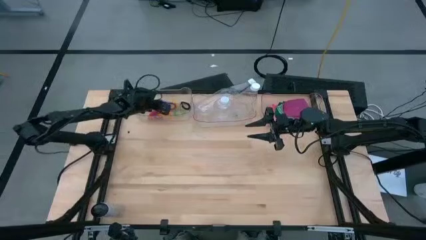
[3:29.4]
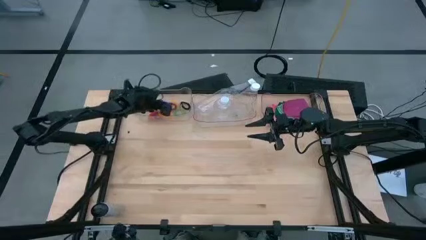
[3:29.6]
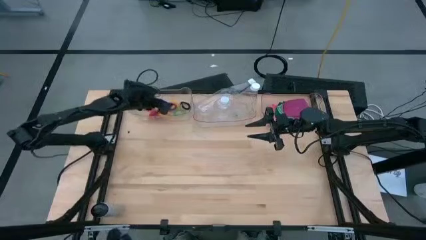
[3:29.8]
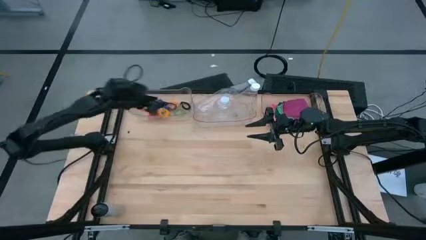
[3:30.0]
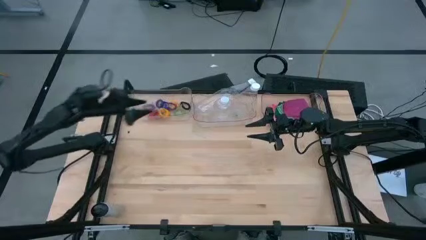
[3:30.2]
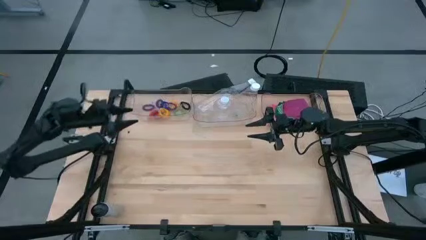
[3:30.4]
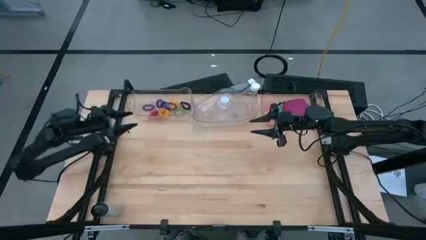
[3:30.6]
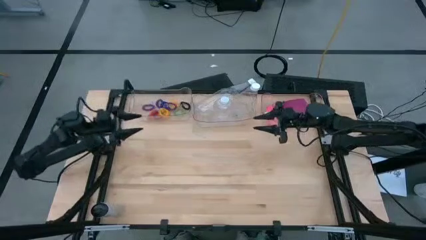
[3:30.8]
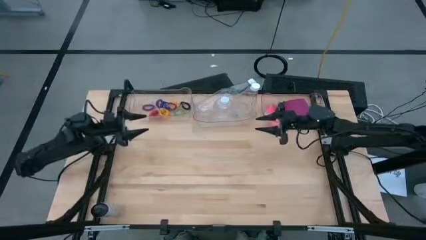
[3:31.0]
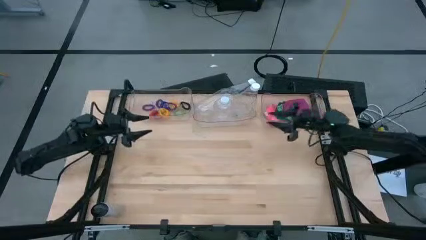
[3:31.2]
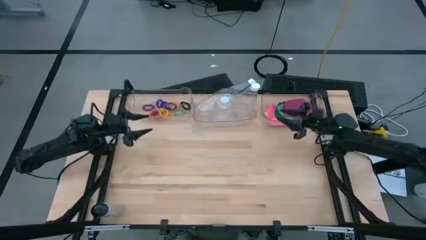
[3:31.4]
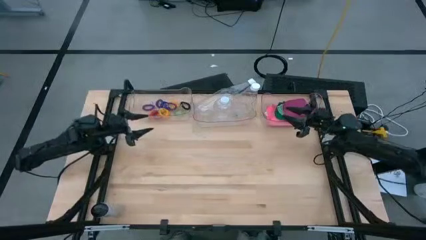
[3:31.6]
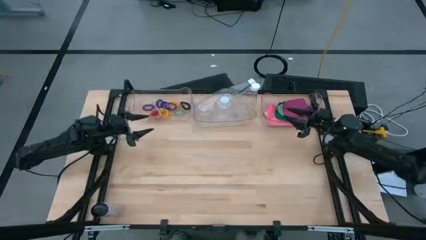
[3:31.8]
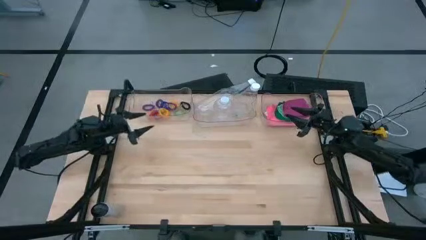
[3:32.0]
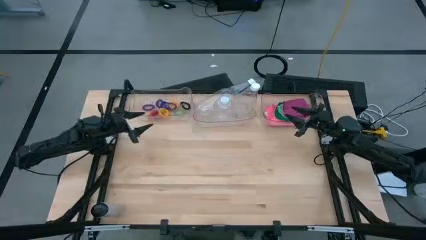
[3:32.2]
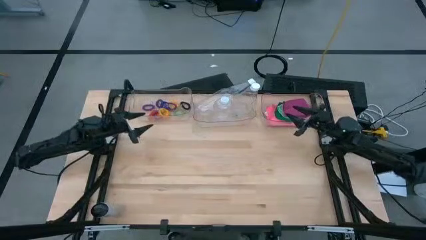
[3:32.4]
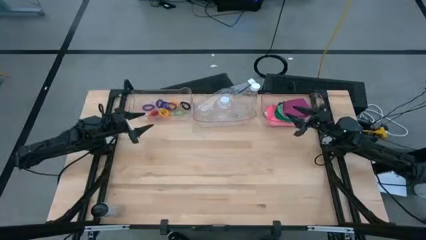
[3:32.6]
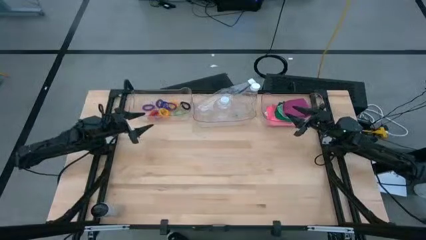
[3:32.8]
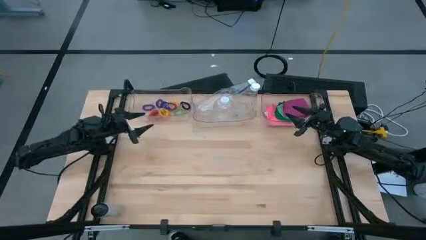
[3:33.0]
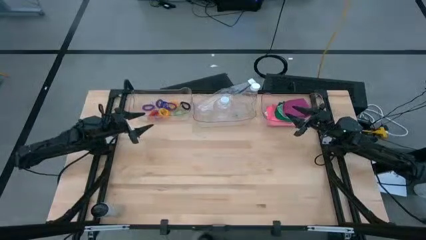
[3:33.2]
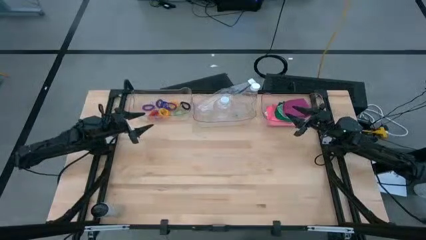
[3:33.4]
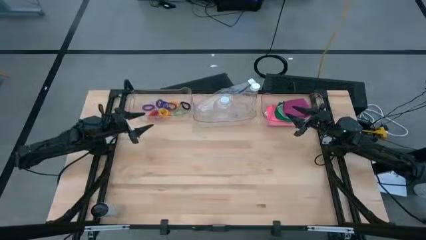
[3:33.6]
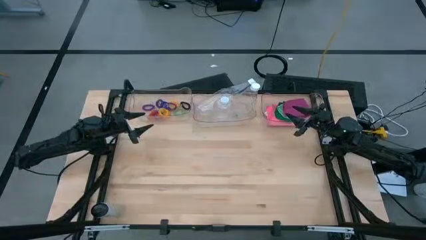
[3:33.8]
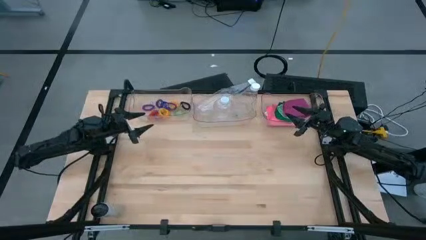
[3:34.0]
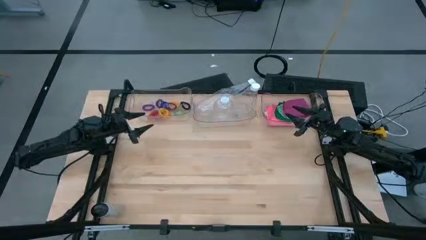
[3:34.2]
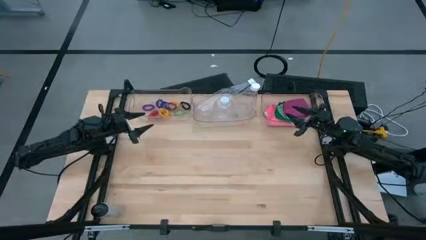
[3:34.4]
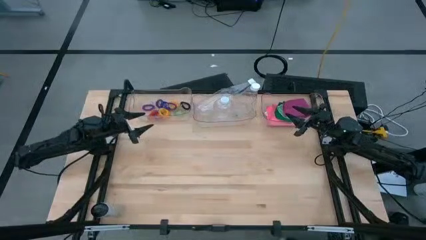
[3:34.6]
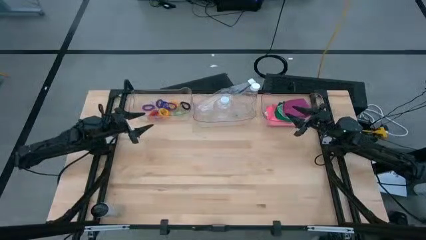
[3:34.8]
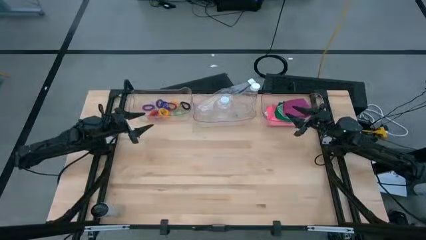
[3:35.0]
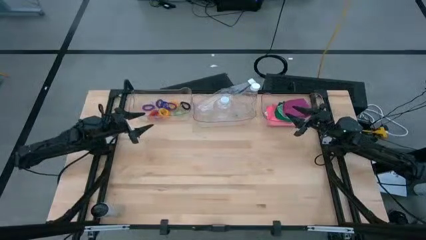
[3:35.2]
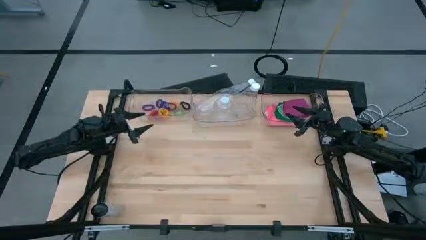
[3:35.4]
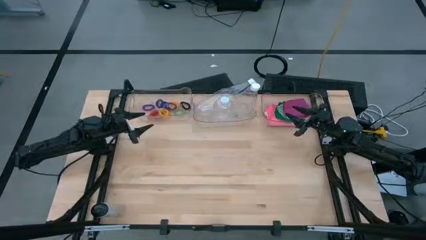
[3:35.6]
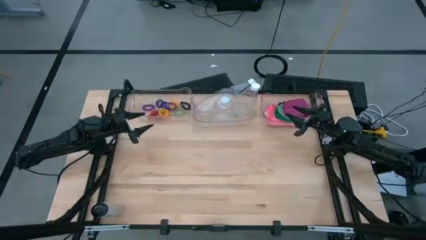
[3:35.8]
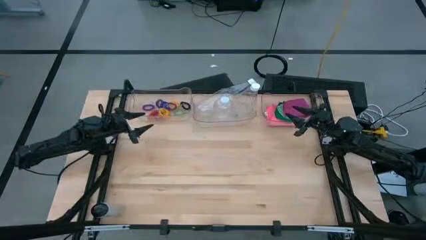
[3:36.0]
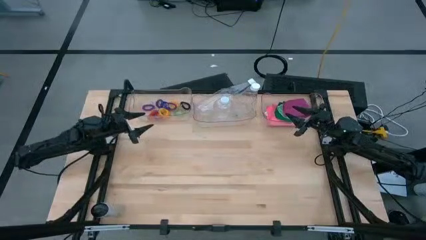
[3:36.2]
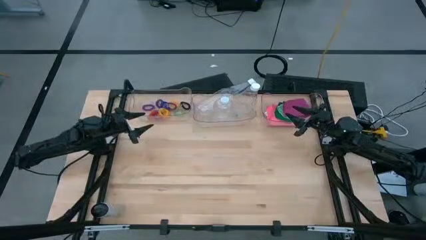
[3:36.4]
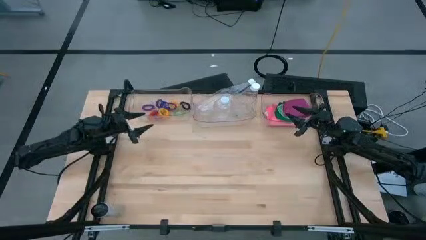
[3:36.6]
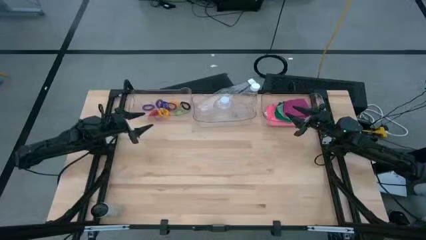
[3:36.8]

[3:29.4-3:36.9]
Task: Pick & Place Sports Items
Return to Home Position

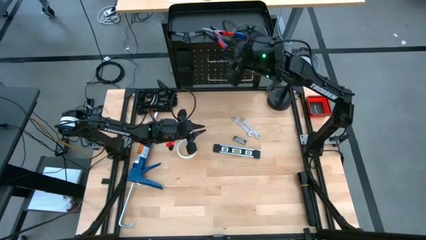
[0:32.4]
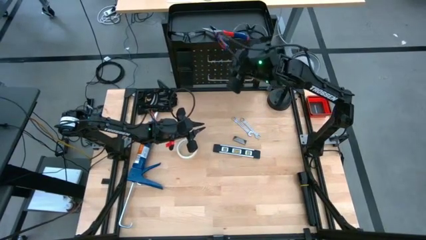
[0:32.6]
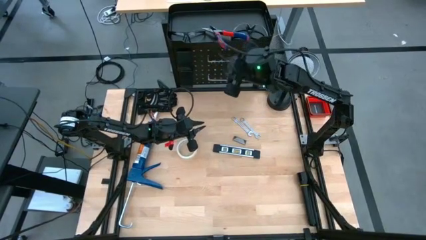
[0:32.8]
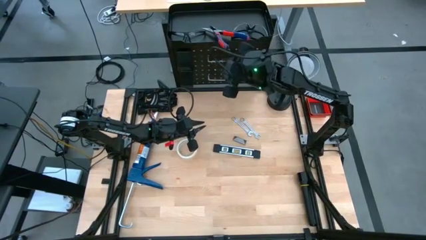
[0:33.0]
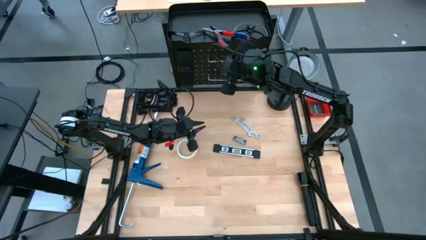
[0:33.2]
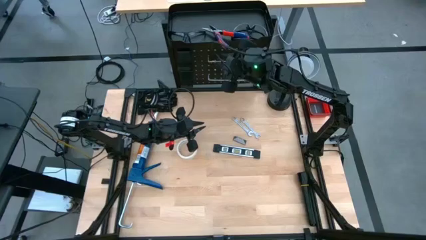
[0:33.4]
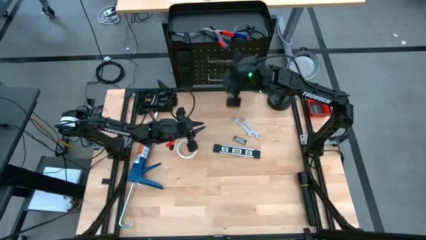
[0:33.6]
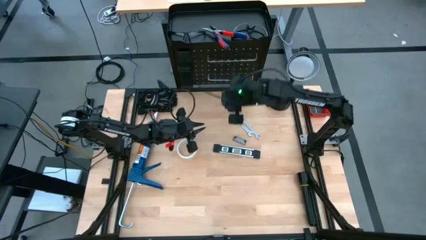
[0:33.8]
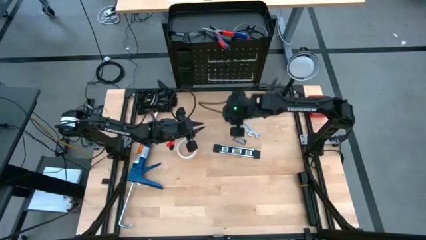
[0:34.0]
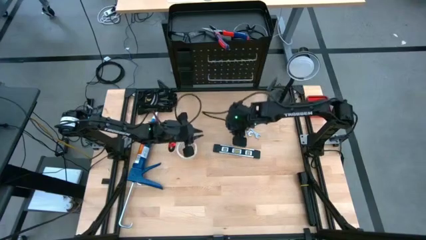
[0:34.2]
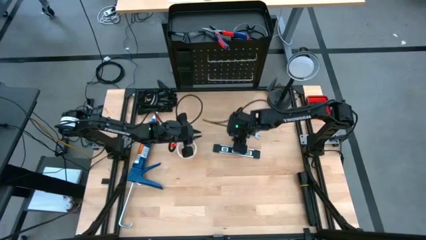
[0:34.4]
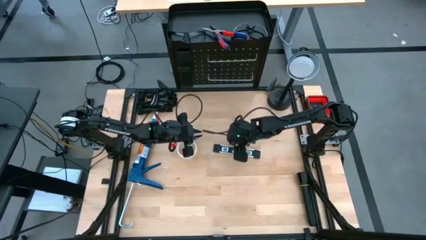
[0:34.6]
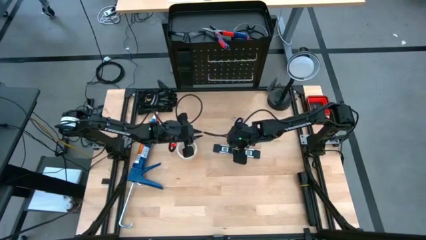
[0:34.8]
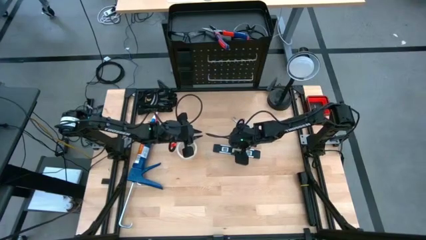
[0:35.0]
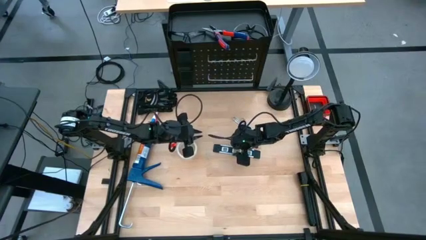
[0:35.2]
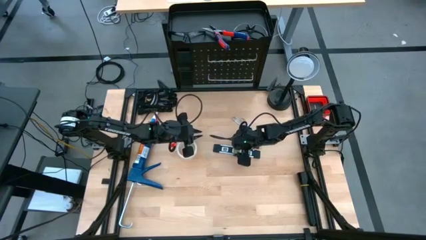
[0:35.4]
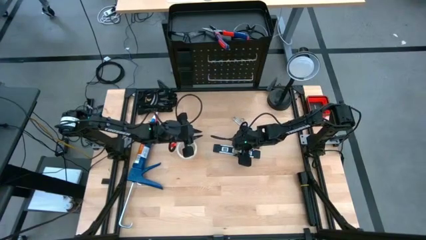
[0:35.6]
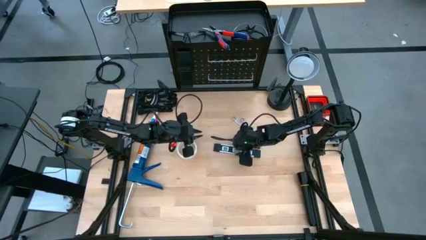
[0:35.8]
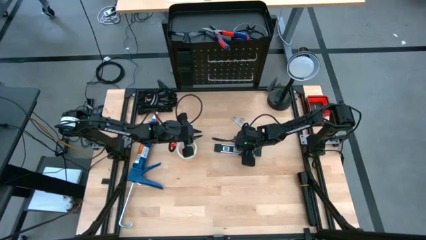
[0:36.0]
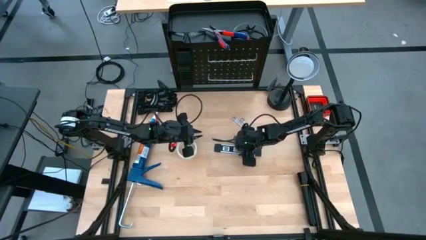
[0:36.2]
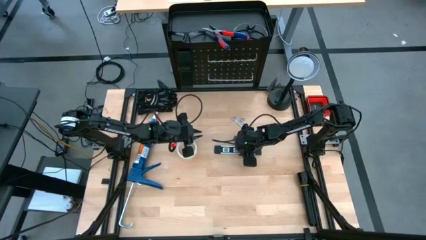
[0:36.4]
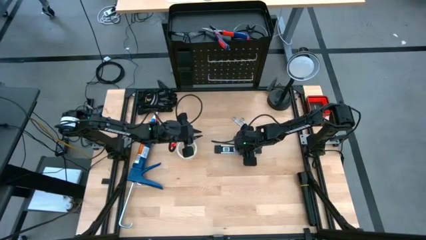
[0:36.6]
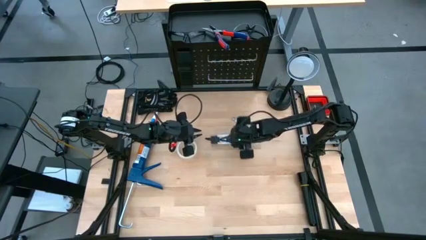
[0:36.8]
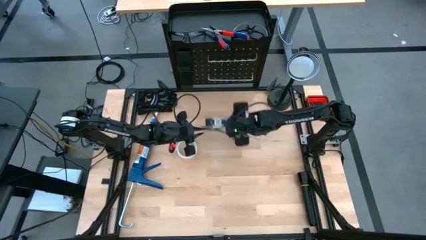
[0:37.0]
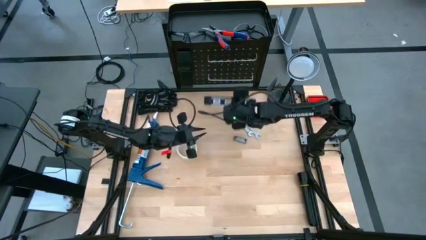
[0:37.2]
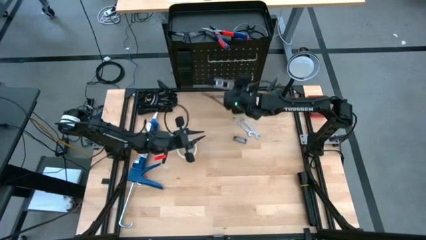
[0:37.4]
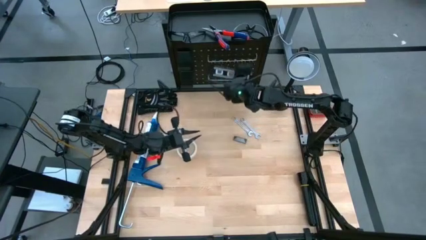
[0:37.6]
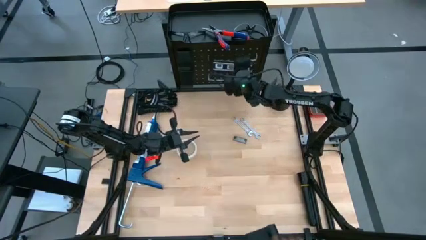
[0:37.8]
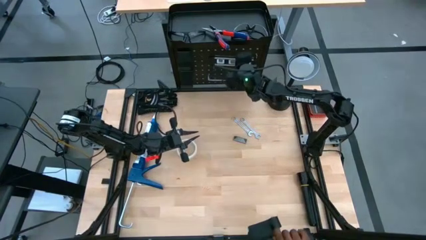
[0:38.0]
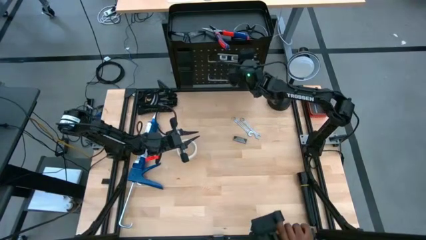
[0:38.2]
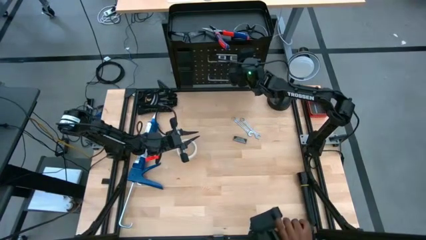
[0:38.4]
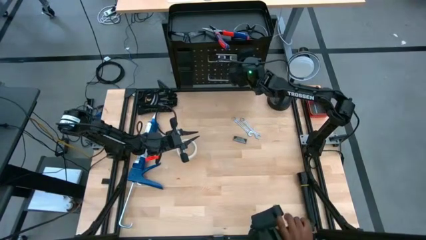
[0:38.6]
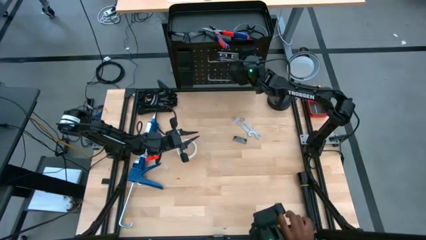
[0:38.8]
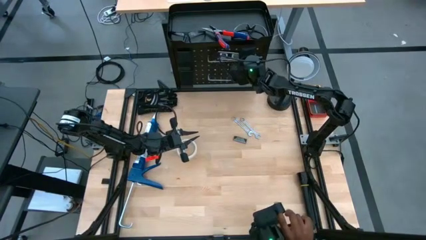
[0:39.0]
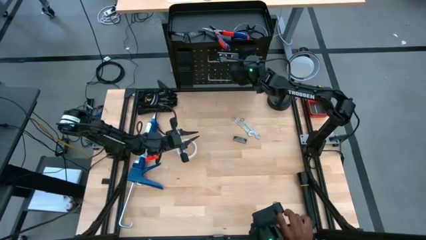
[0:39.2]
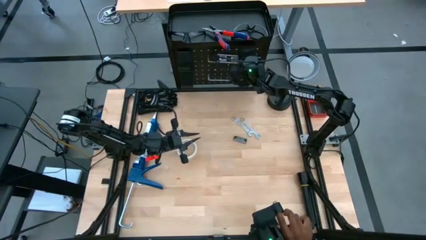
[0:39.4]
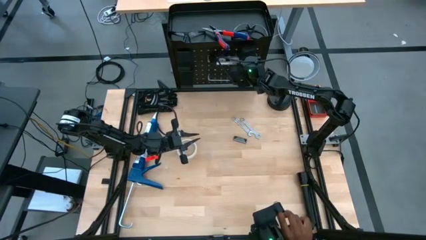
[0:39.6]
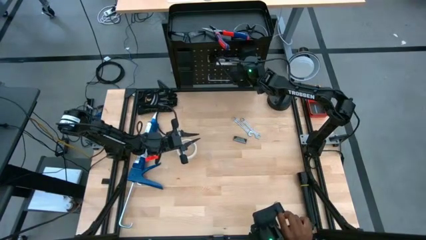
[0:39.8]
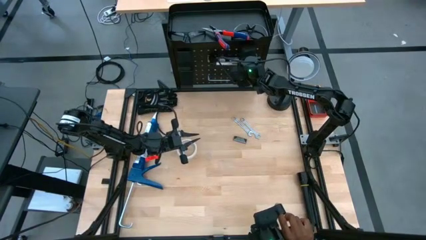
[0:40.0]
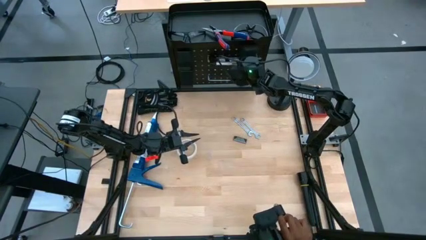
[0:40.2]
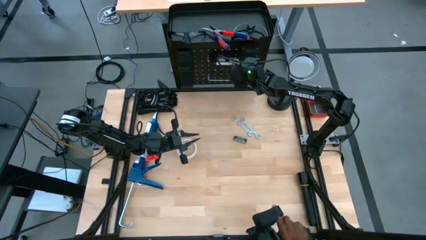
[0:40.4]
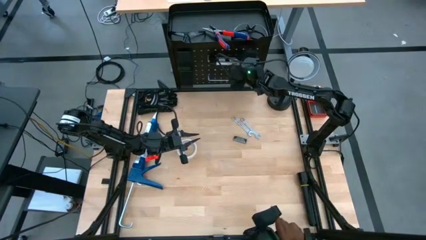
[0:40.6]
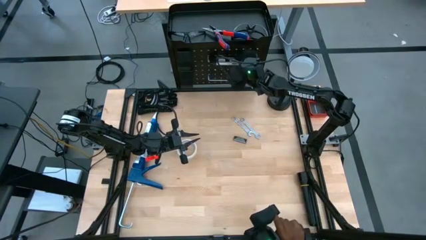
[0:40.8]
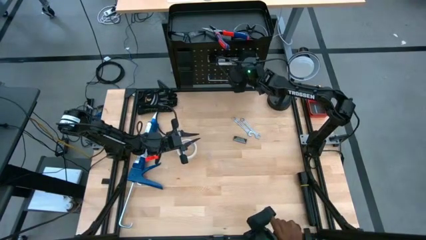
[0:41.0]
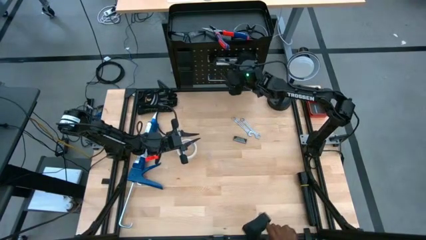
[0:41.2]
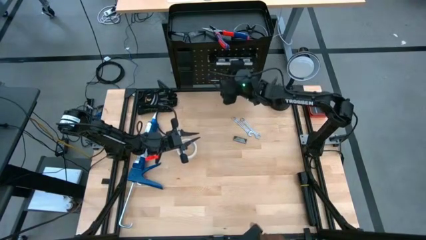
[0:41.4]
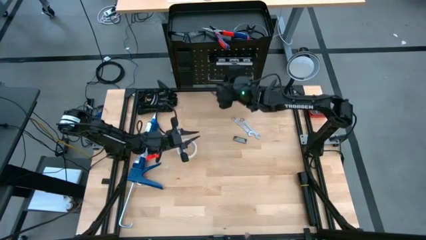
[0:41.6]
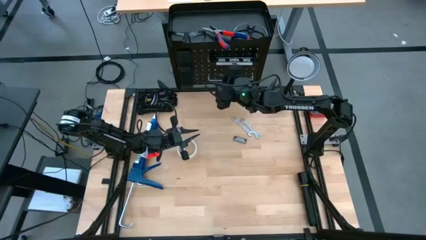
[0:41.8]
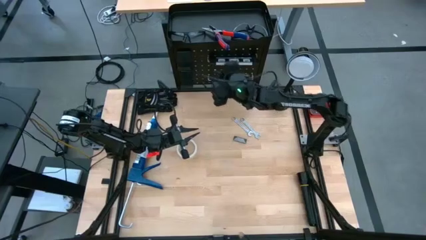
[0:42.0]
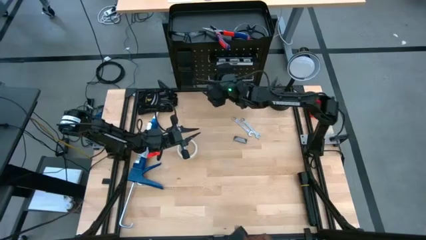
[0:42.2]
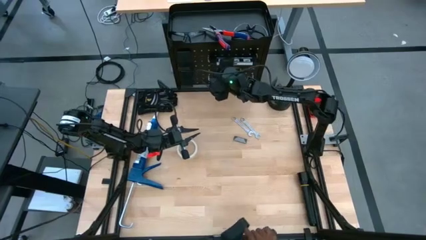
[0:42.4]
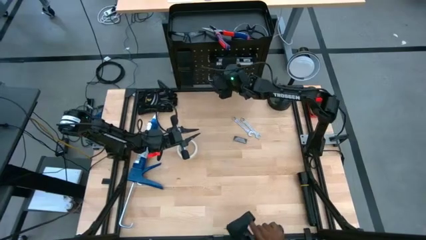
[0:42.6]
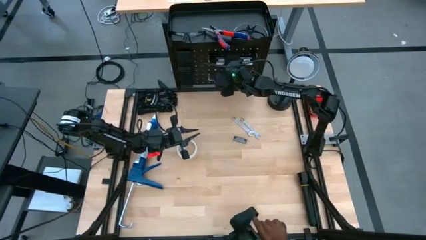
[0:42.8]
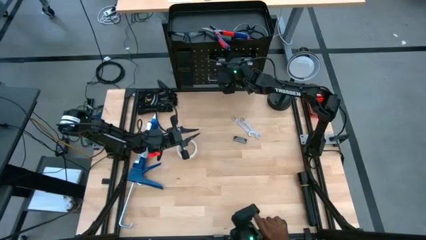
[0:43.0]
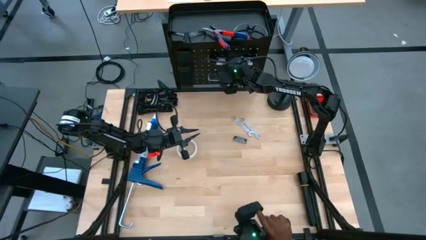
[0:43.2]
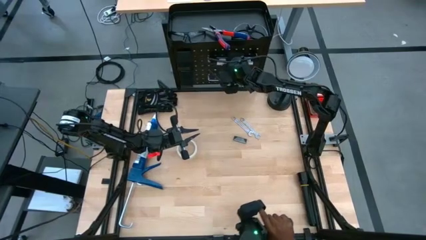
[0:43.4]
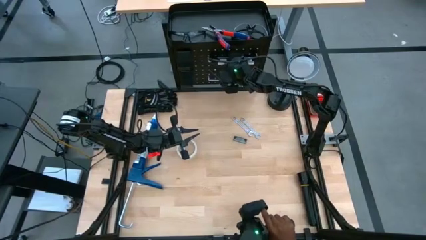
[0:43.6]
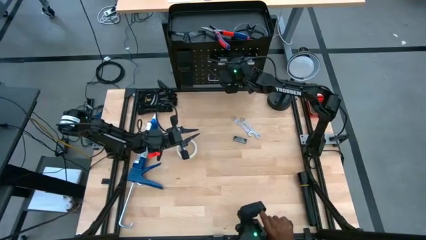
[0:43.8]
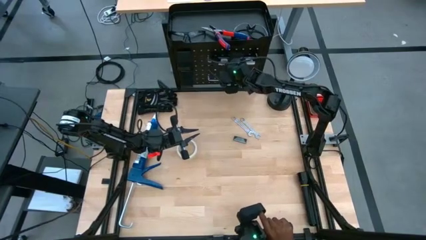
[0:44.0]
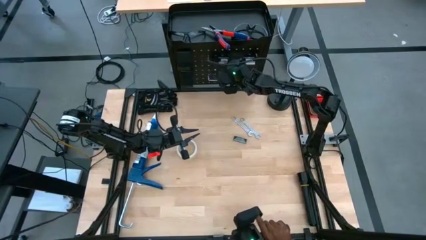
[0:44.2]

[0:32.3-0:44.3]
Task: Hang tools onto peg board
Put the black spirit level on the black peg board
